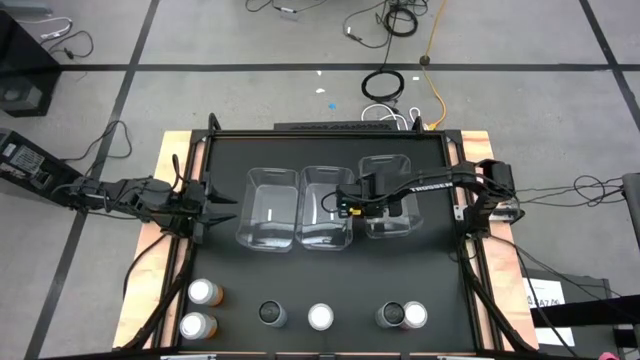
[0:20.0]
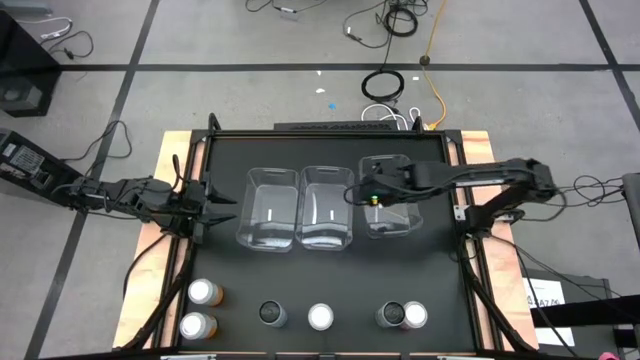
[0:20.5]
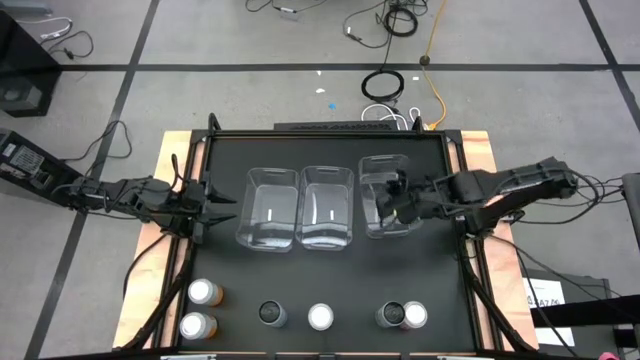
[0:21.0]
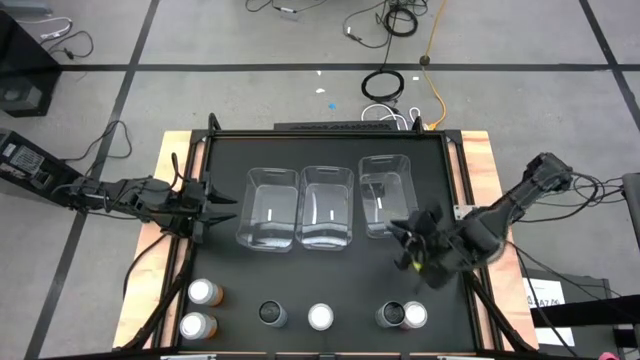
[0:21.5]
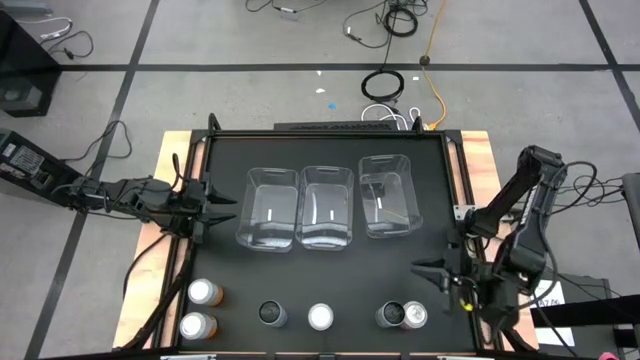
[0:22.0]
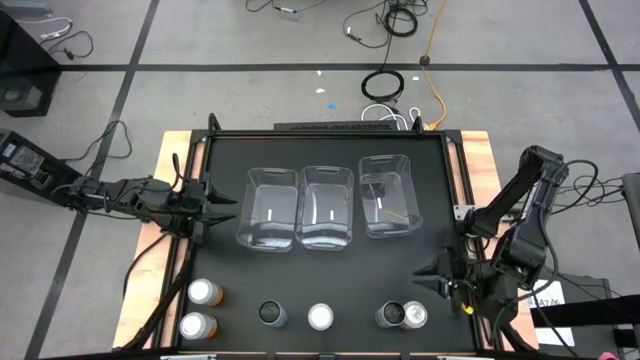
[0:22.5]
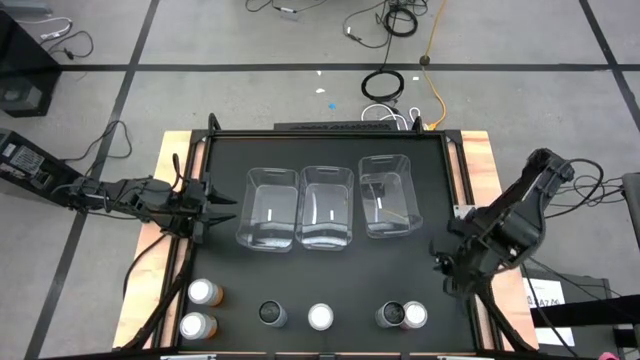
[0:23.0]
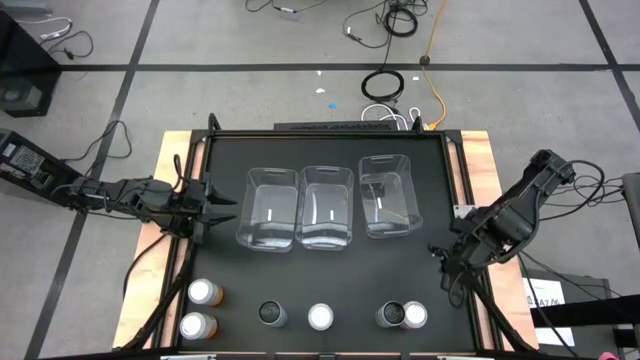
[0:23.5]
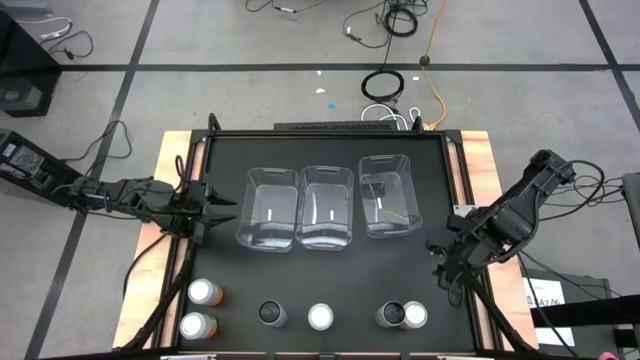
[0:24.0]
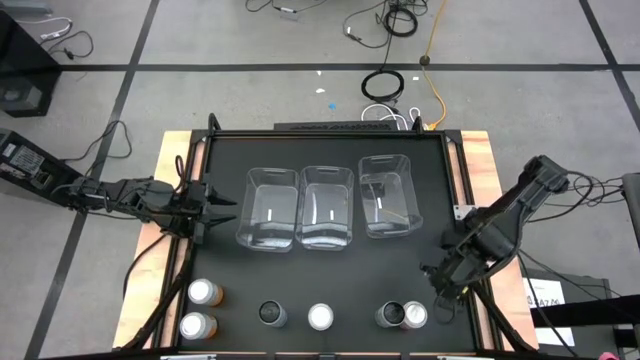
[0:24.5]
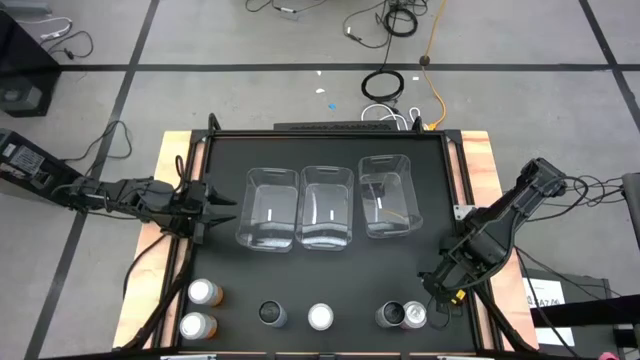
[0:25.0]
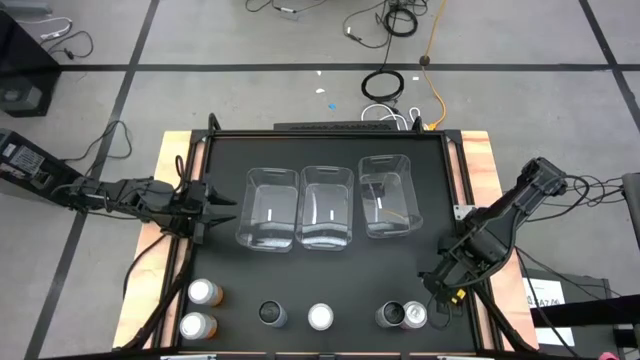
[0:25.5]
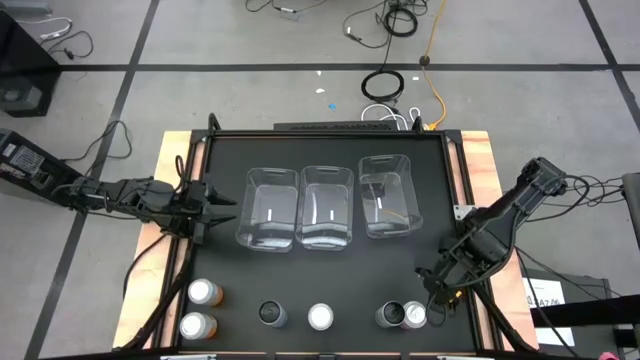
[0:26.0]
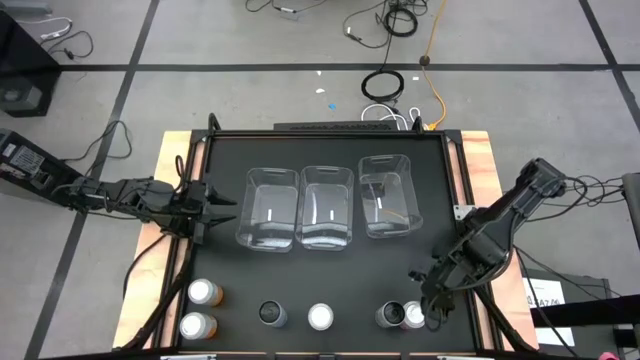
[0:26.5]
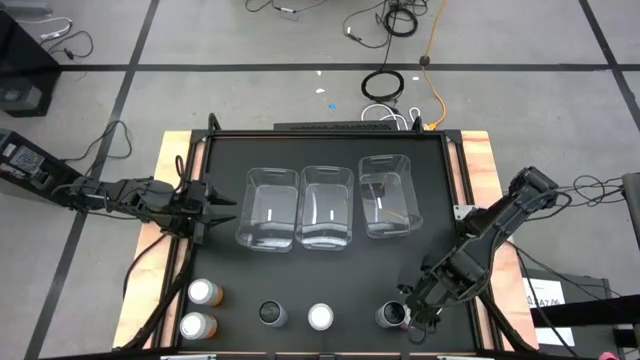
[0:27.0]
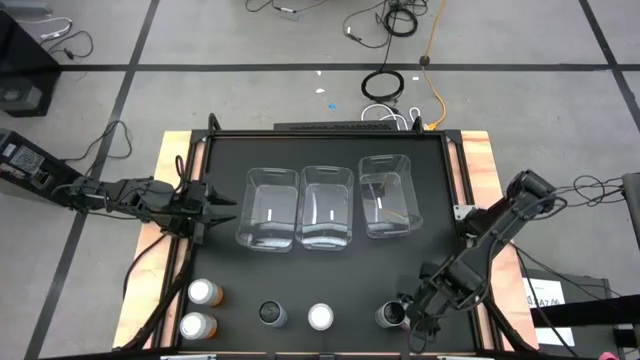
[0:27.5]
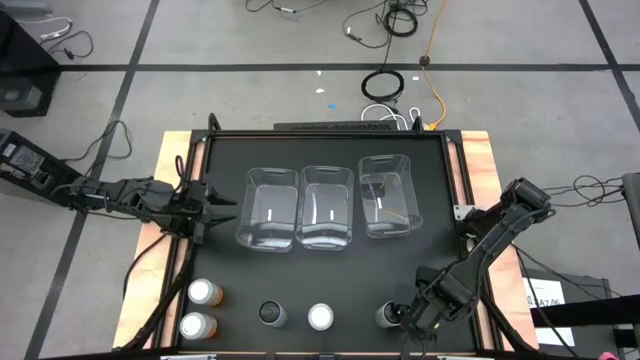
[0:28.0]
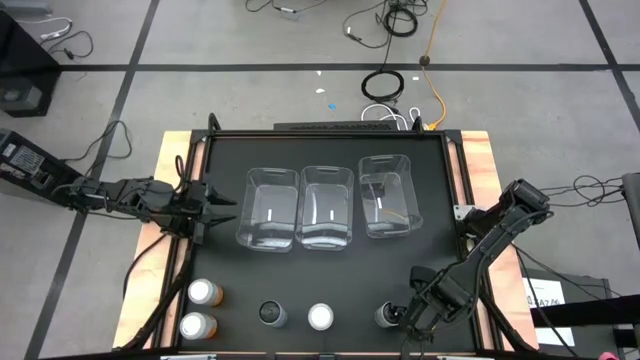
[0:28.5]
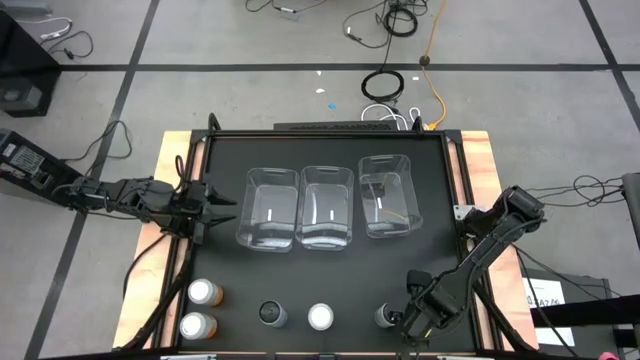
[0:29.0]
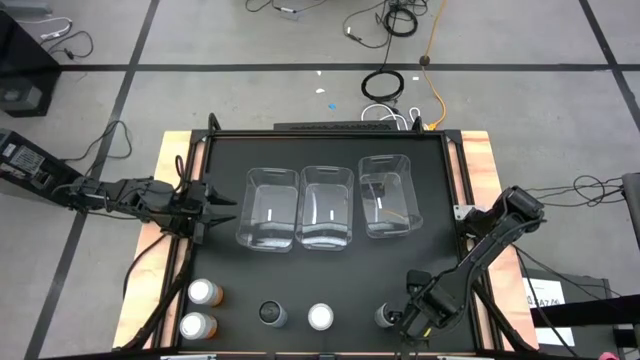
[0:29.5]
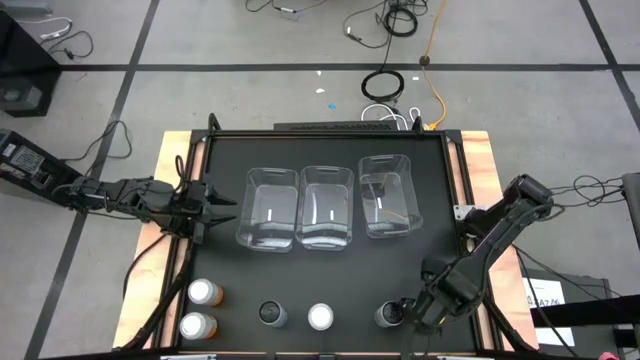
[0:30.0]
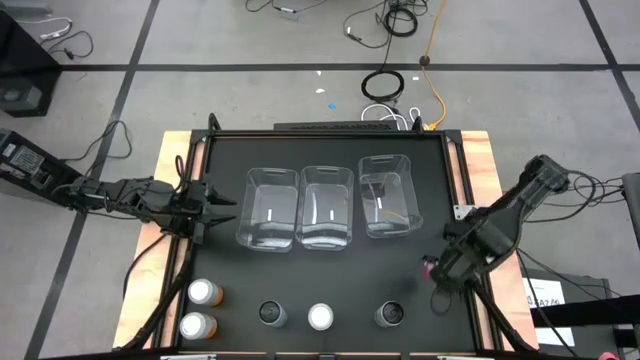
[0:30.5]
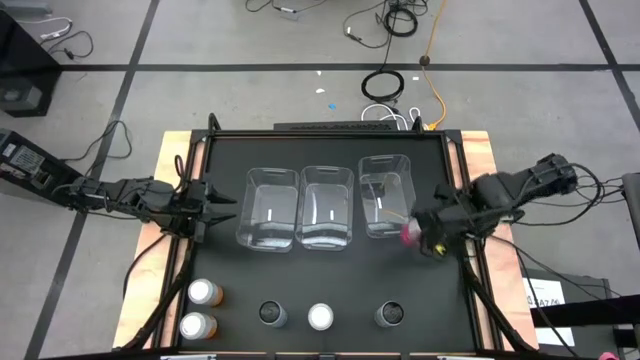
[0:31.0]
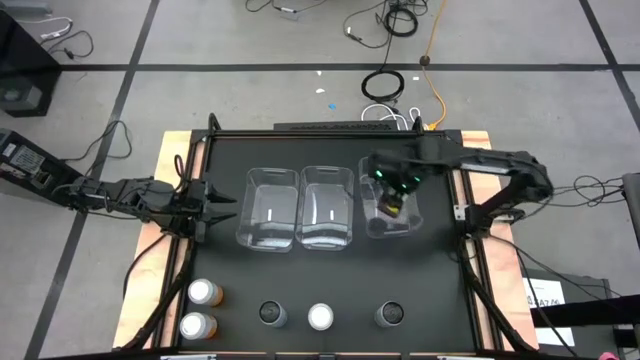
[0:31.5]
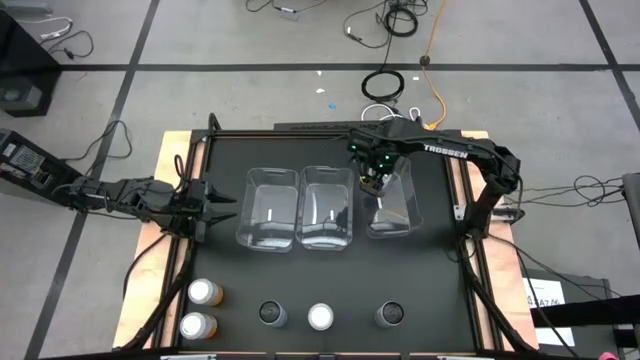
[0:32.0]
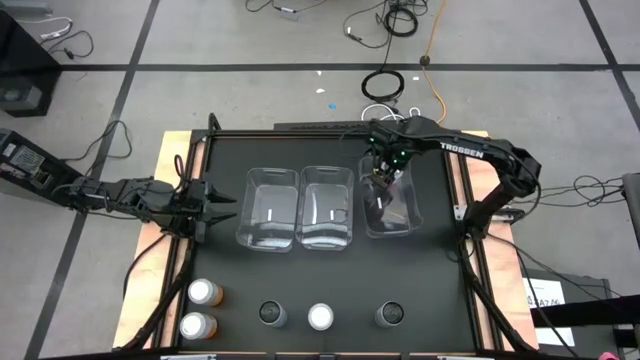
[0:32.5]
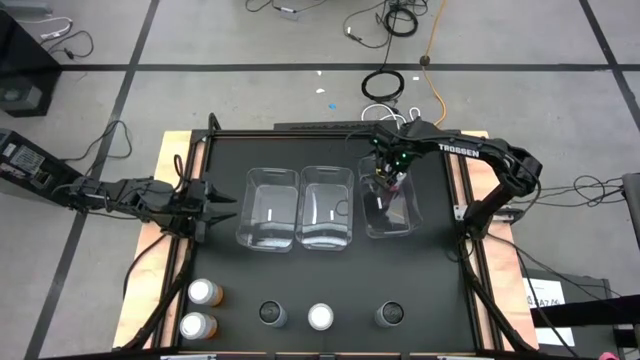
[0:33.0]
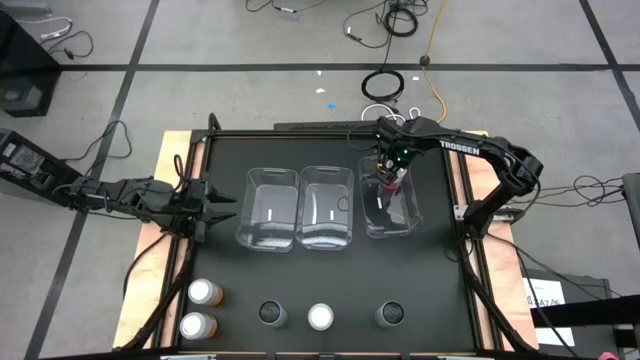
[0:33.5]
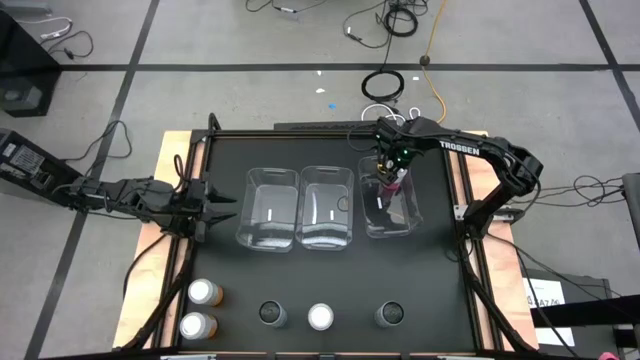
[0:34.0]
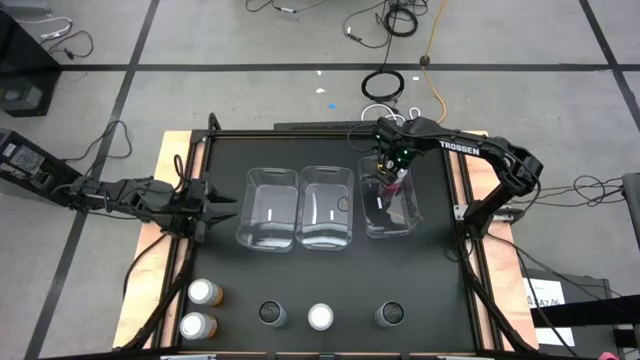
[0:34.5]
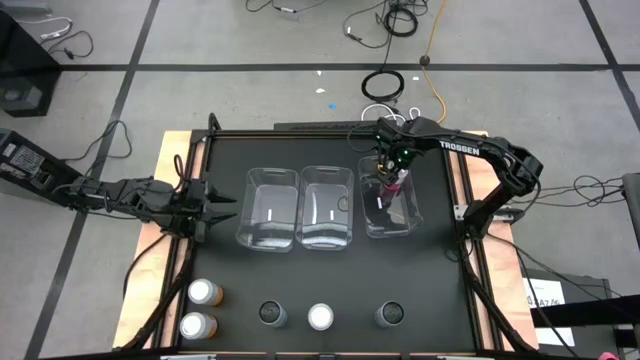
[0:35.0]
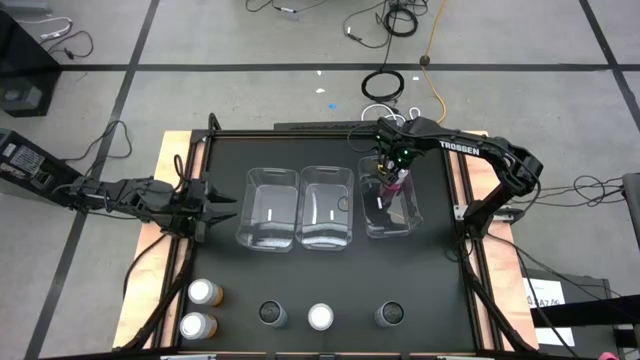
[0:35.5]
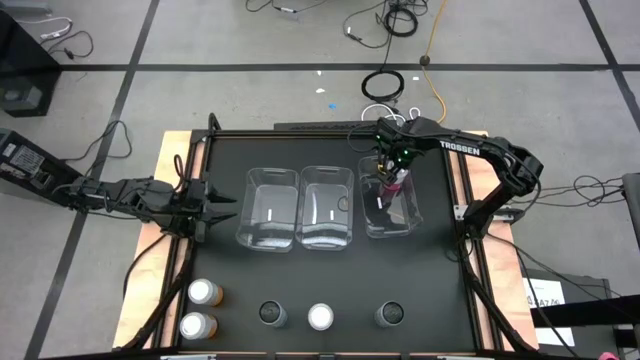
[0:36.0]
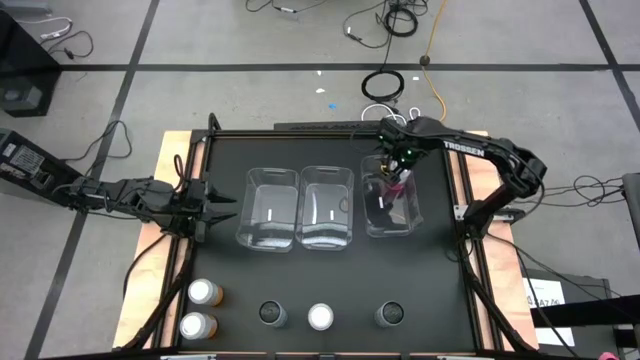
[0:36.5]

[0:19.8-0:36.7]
Task: Sort soda cans
Put the right pink/white soda can into the right transparent bin

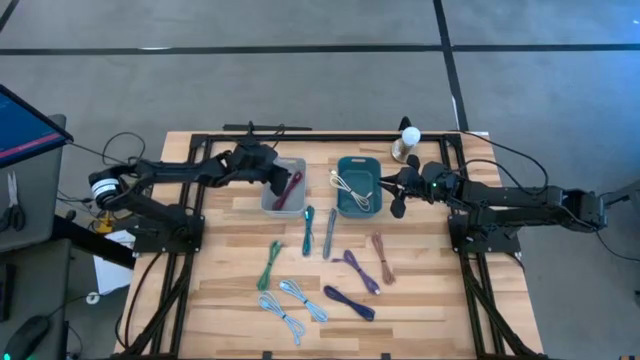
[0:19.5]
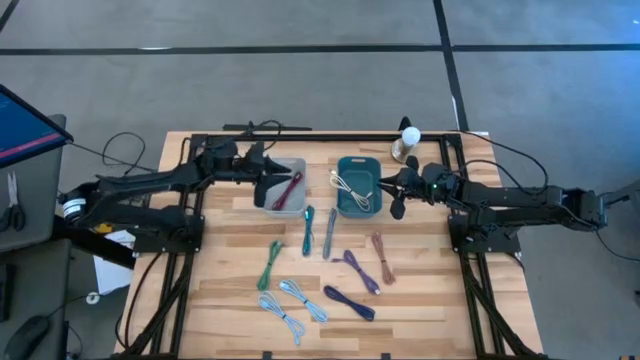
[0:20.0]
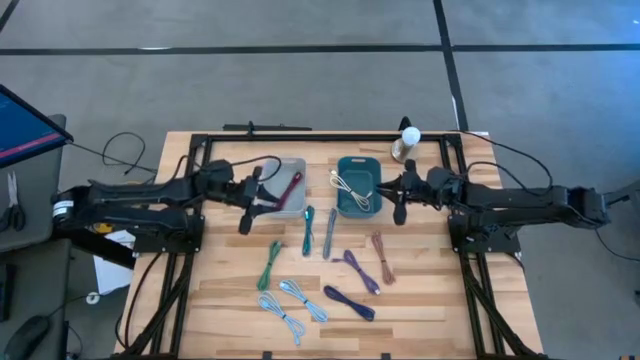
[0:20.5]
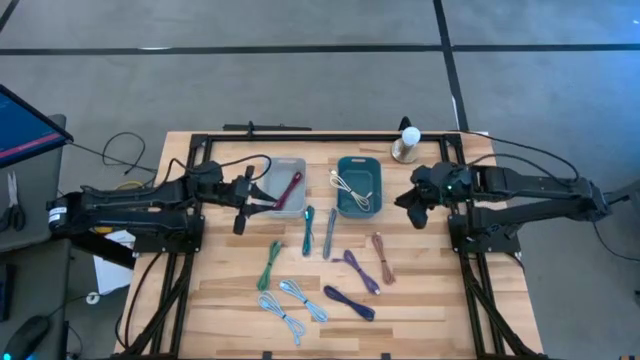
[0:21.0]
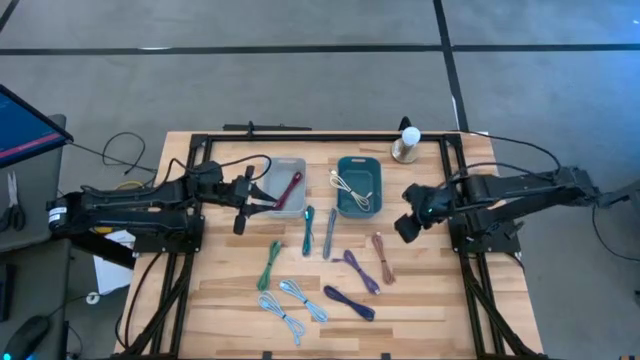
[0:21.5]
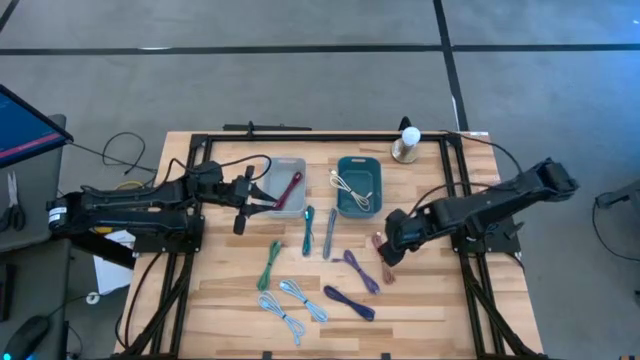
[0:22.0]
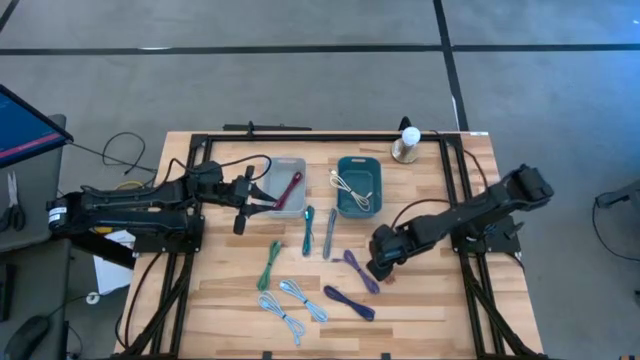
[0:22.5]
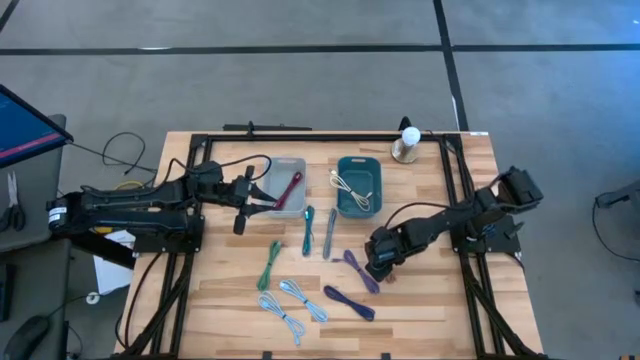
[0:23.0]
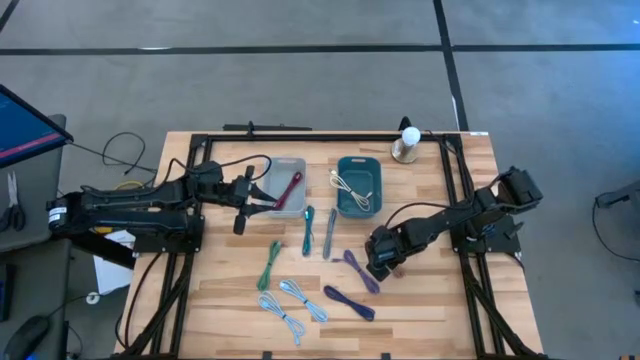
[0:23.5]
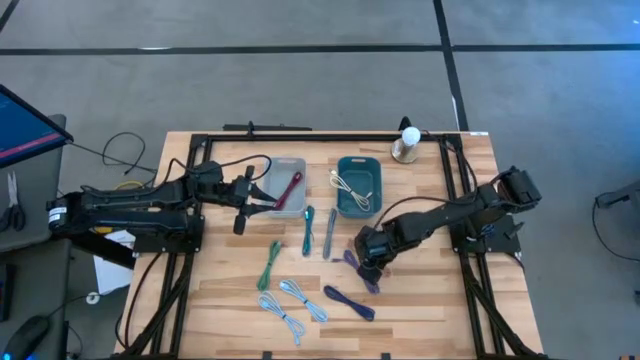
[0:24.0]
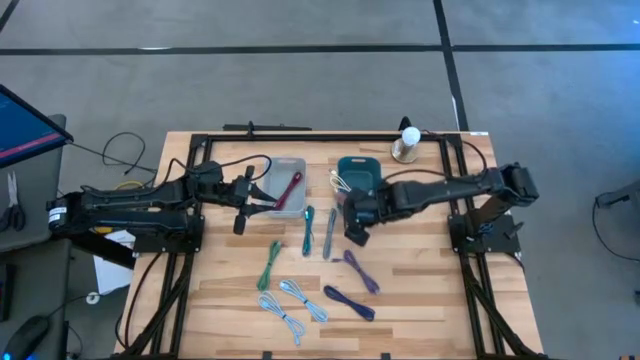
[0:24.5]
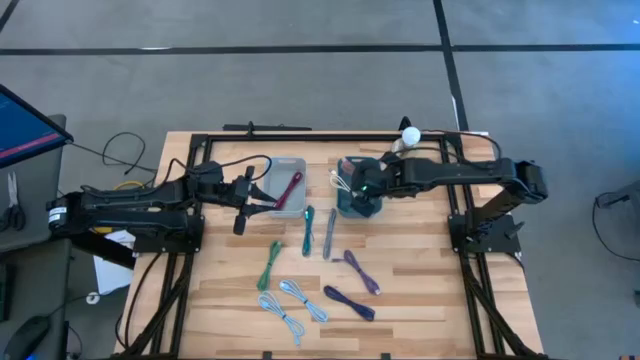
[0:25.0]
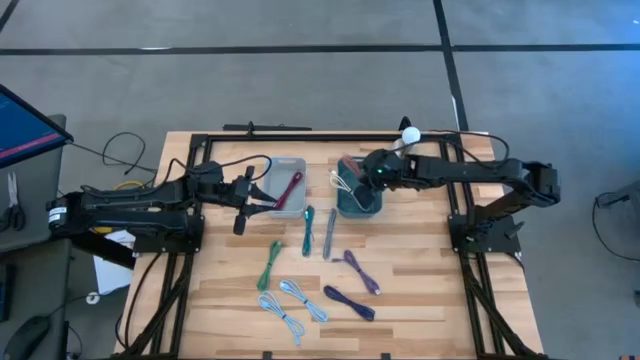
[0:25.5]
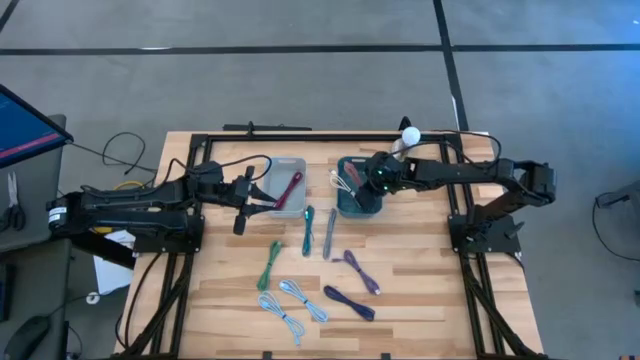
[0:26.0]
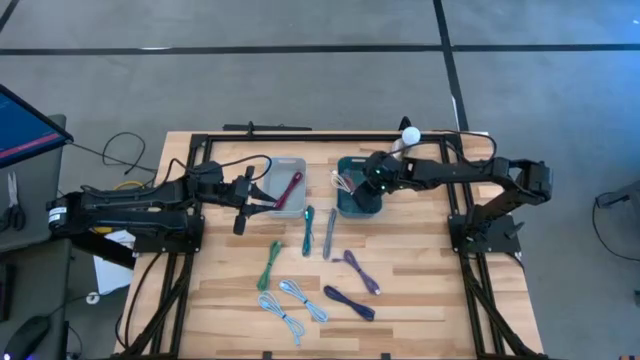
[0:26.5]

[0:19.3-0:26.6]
Task: Pick & Place USB Port
Put the pink charger cable into the blue bin
